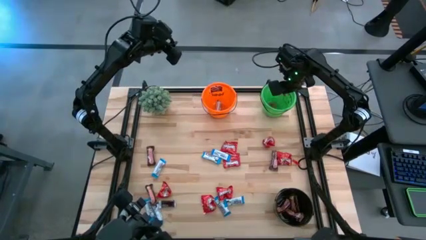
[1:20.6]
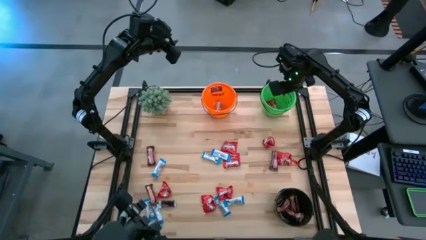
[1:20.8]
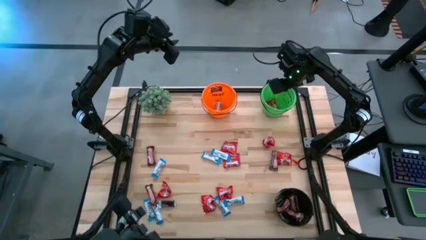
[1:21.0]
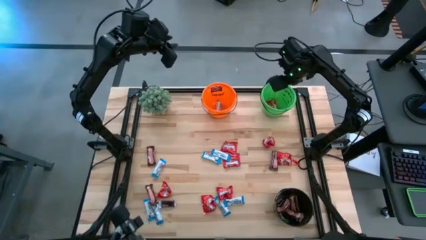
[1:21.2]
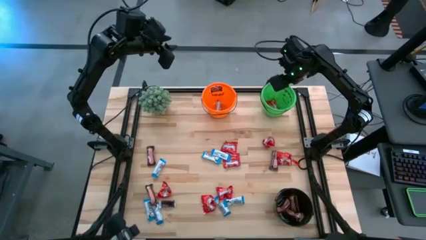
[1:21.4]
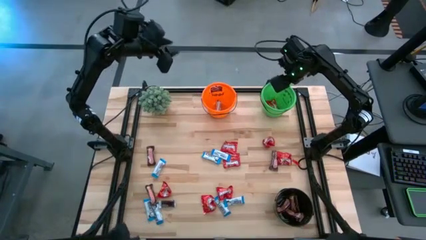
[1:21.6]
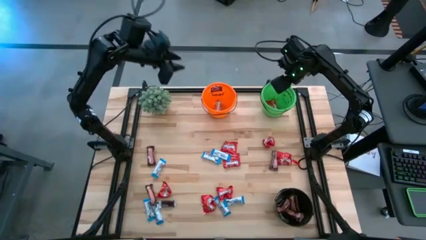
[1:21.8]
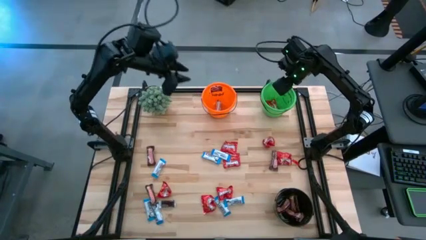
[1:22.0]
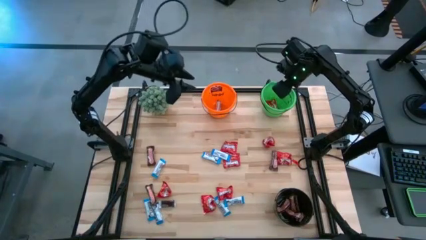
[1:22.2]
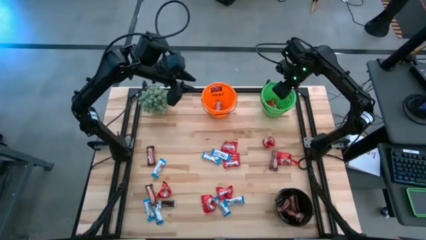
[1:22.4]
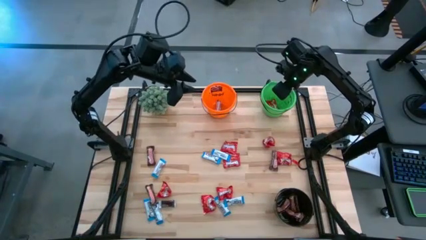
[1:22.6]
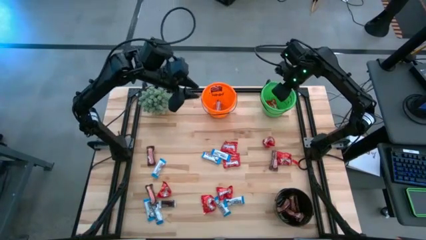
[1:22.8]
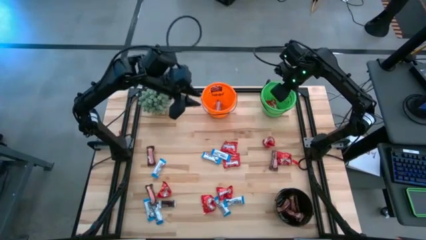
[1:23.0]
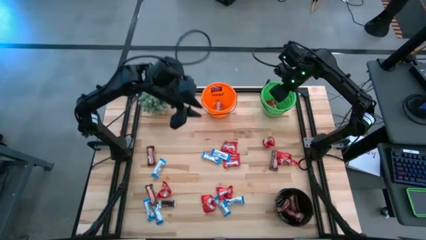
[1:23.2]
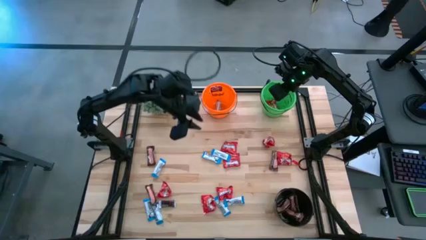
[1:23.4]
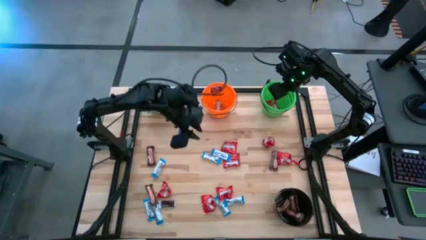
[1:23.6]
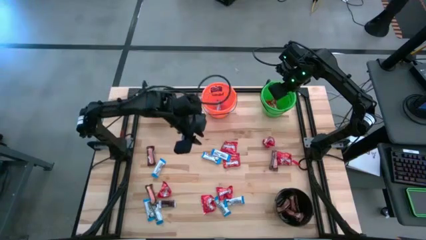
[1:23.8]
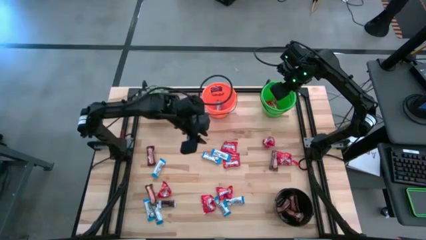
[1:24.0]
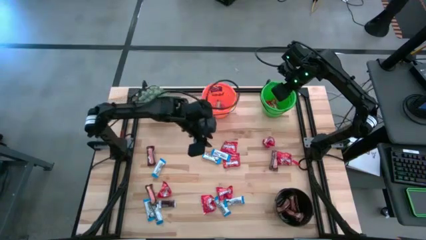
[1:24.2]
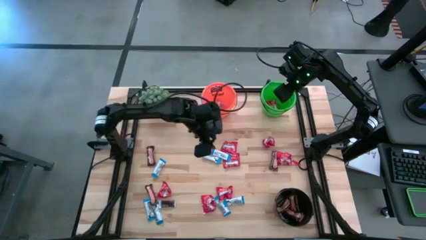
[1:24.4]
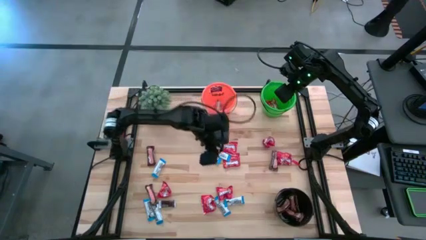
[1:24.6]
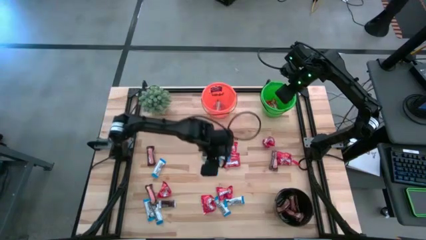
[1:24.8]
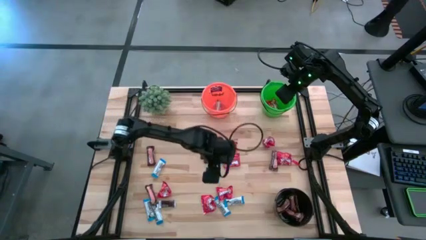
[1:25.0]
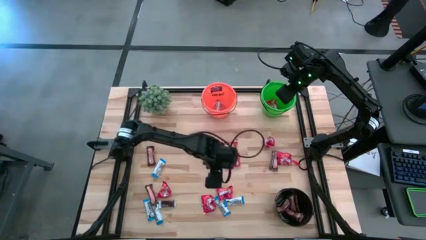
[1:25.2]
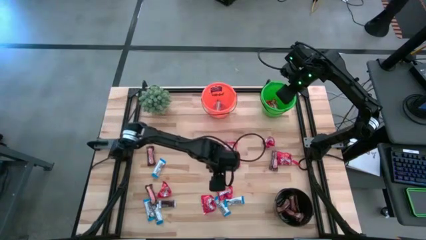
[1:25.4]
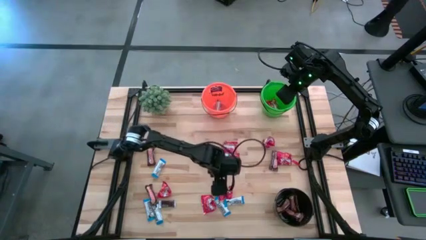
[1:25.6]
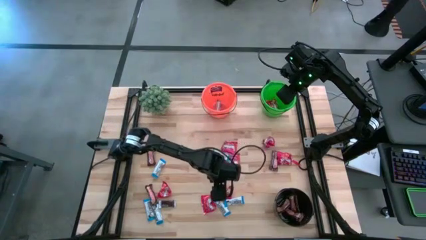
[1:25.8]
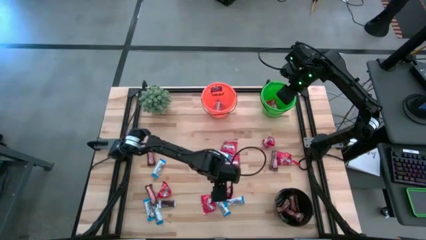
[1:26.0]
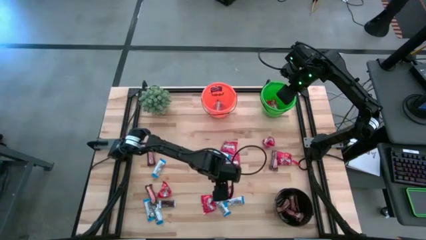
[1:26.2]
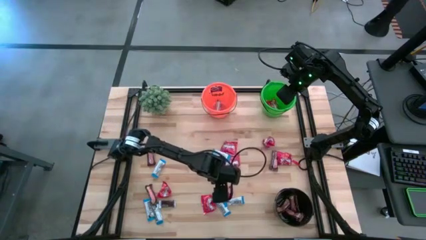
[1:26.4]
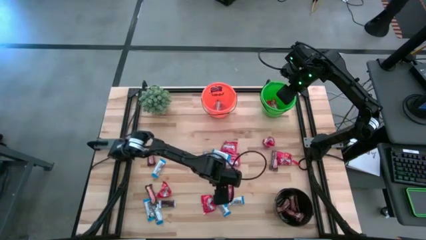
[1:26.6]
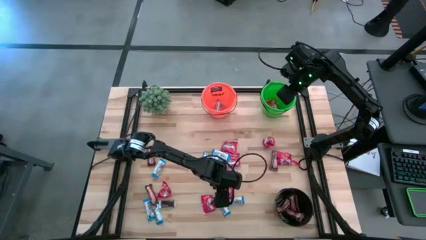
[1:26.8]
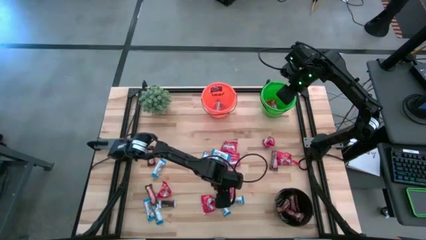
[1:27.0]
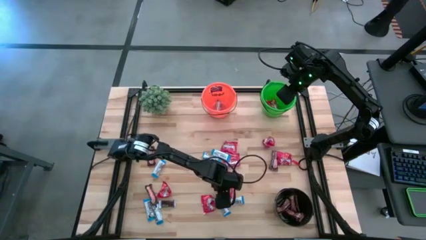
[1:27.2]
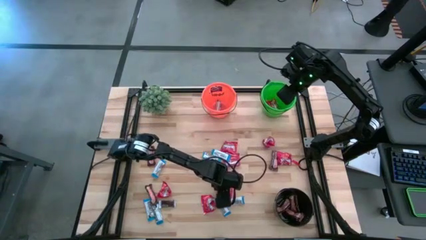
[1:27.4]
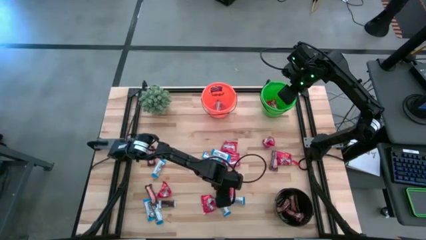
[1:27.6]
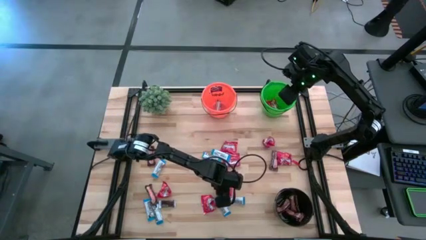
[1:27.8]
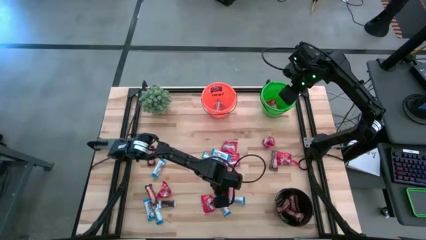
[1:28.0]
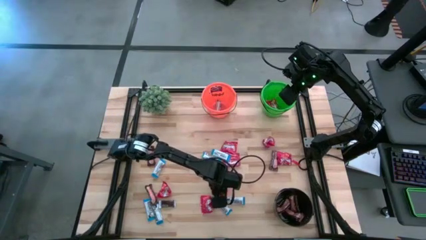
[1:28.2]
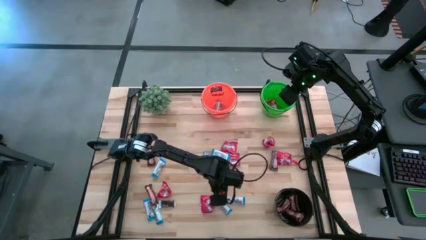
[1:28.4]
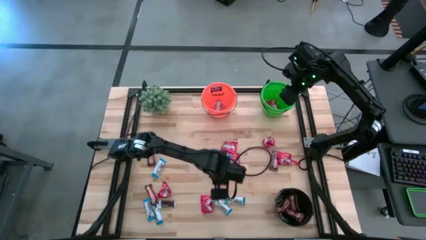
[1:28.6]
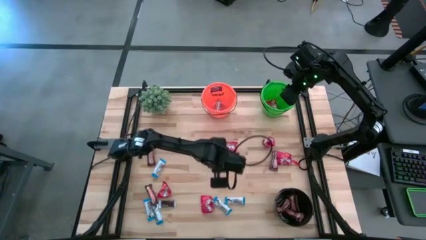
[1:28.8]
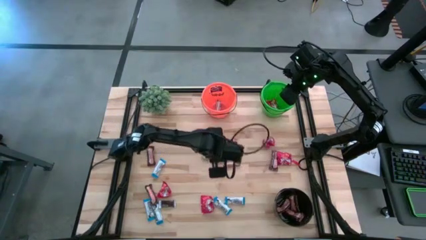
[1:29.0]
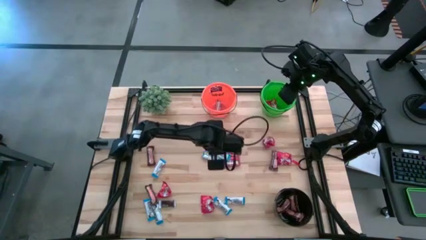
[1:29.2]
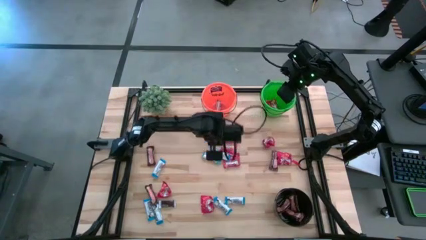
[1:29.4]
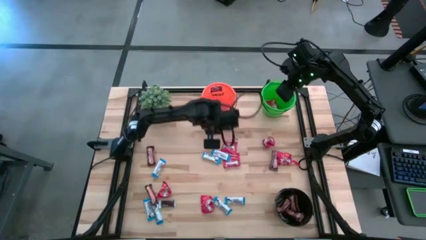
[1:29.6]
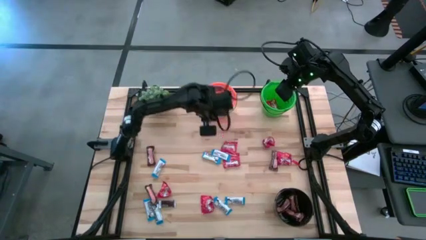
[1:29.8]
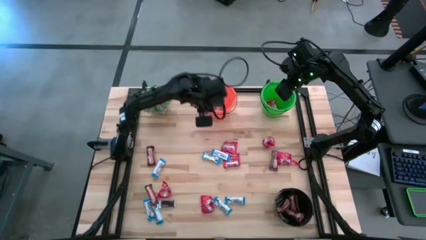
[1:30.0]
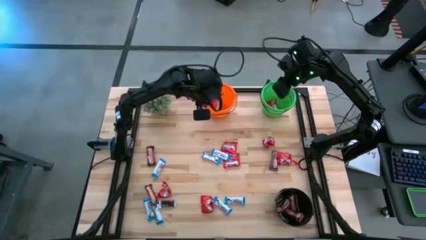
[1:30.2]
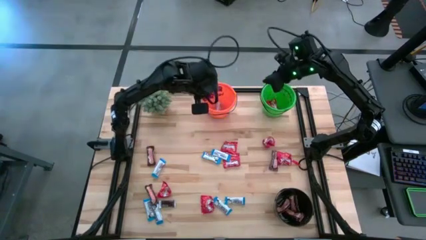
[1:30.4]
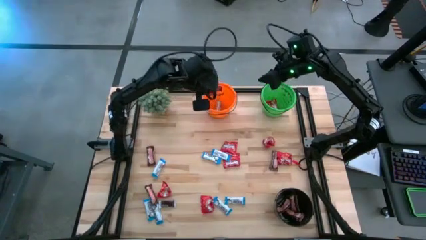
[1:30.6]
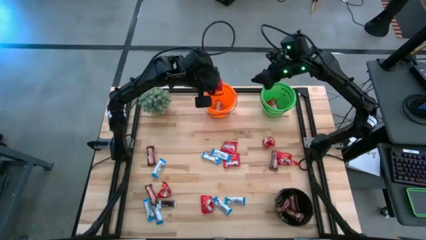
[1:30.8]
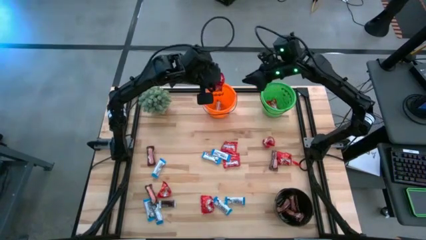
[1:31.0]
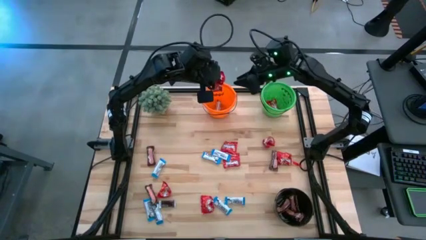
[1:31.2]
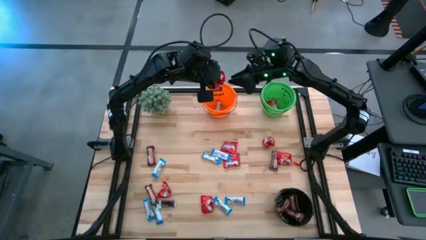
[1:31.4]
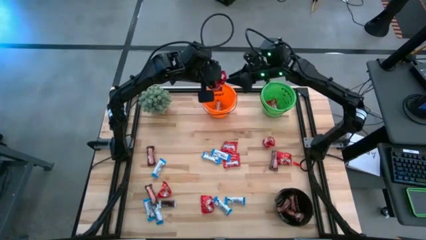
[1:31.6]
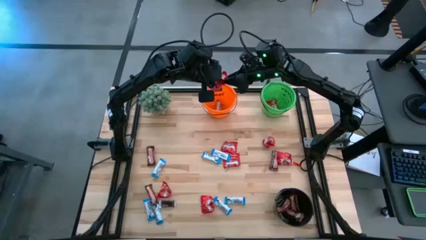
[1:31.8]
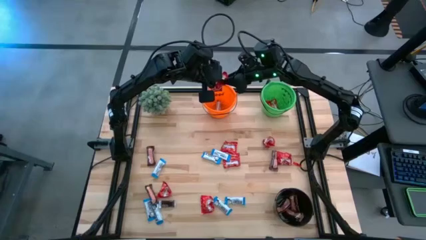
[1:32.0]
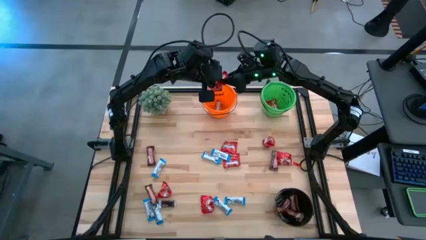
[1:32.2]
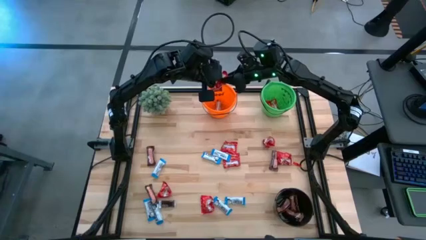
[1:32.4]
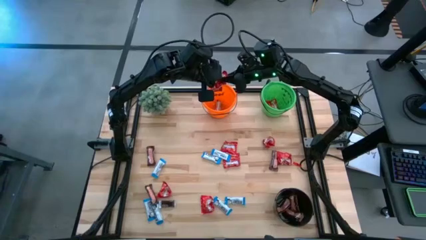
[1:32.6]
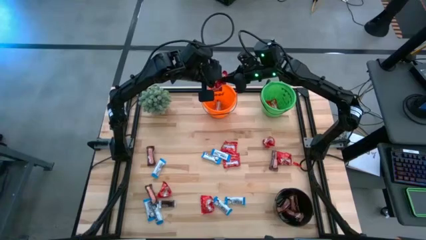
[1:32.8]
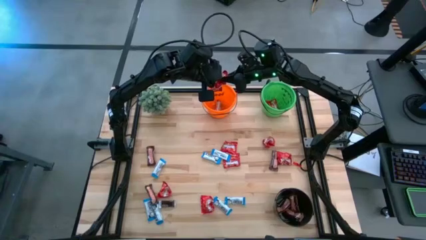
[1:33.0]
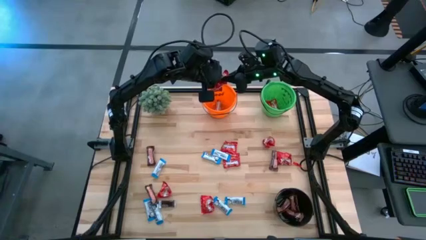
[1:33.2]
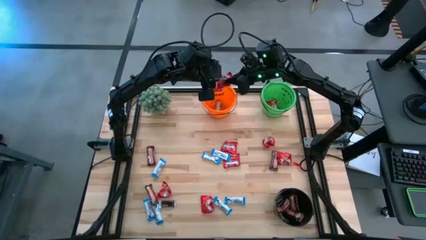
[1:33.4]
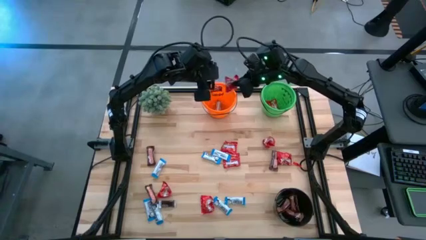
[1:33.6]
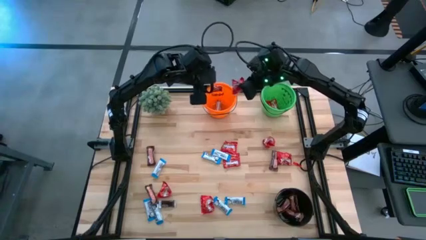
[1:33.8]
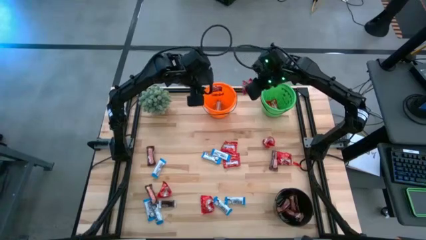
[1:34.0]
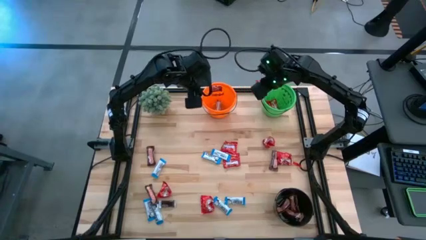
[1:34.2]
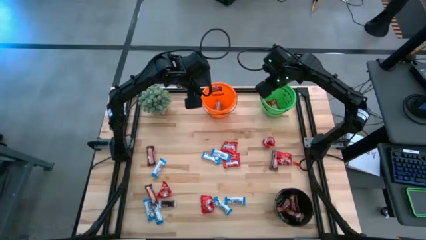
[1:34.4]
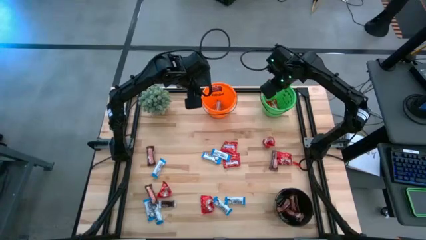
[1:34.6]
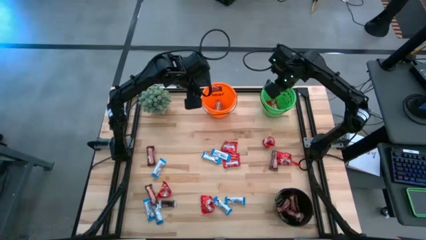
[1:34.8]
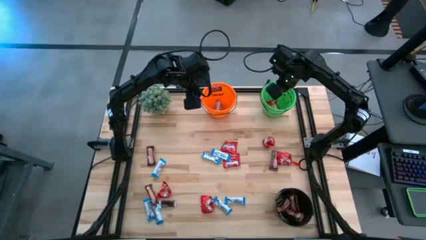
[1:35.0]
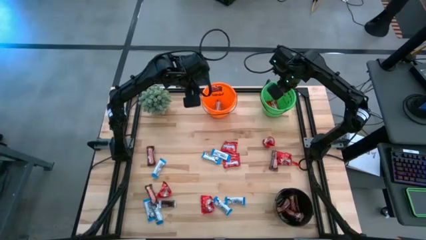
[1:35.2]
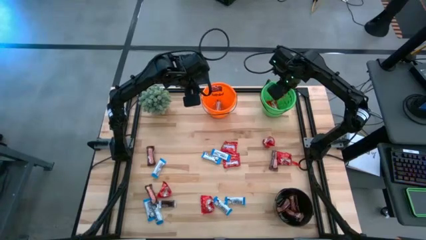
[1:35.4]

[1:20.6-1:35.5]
Task: Organize candy in baskets
Put the red candy into the green bucket
